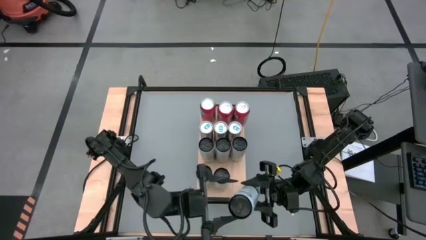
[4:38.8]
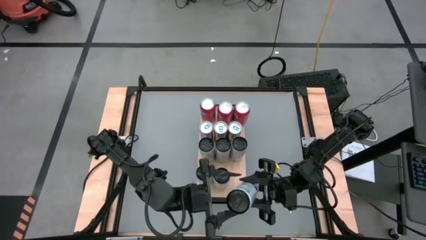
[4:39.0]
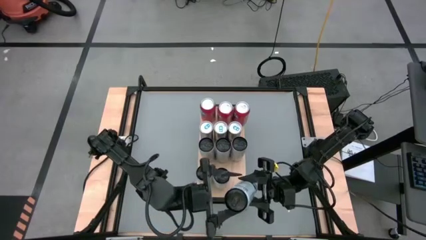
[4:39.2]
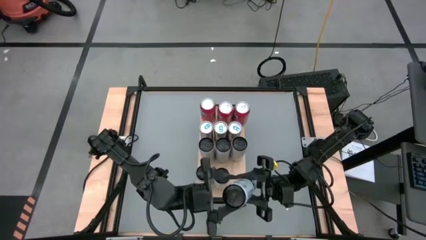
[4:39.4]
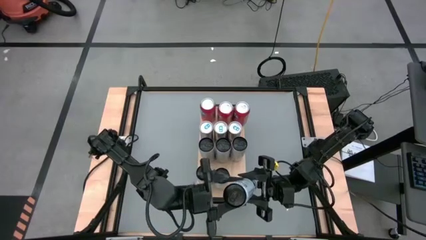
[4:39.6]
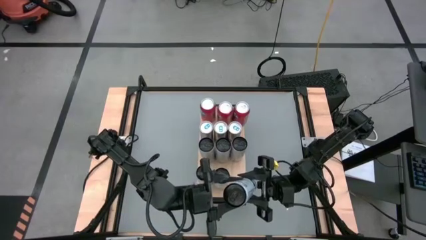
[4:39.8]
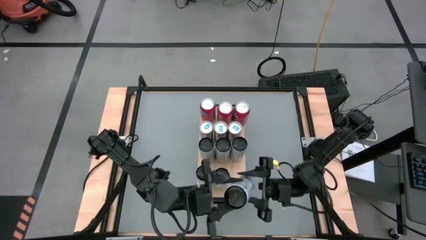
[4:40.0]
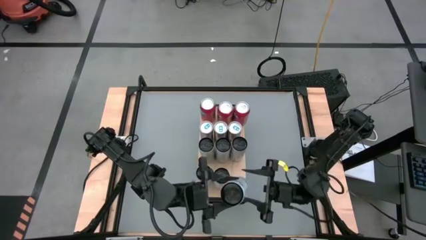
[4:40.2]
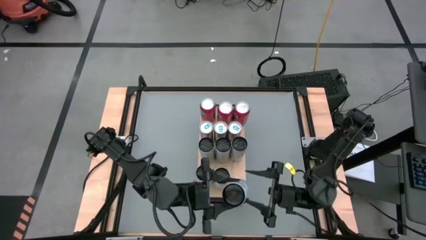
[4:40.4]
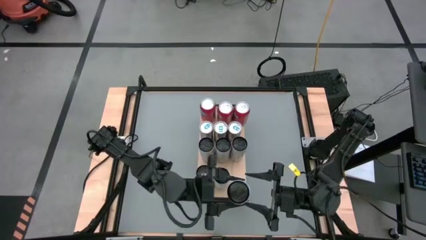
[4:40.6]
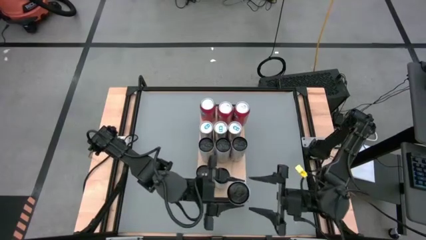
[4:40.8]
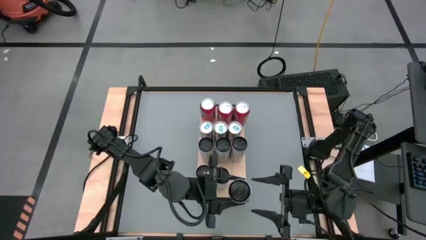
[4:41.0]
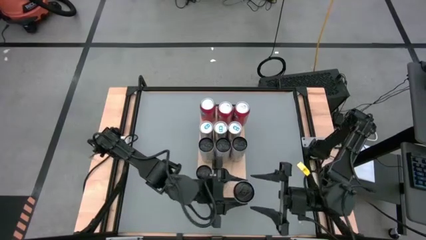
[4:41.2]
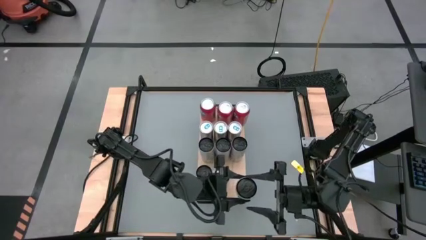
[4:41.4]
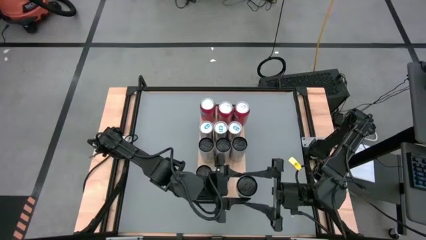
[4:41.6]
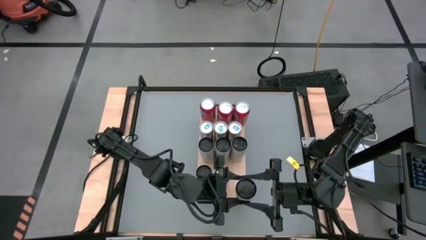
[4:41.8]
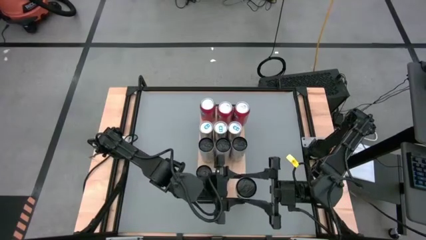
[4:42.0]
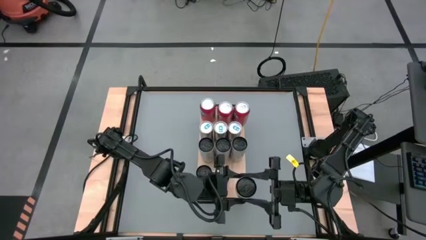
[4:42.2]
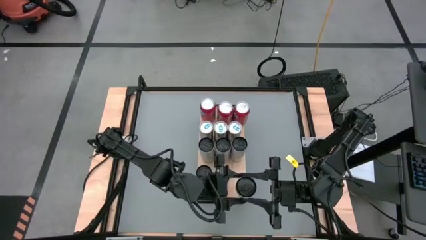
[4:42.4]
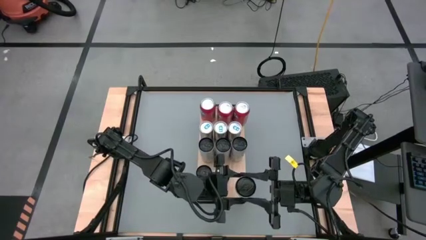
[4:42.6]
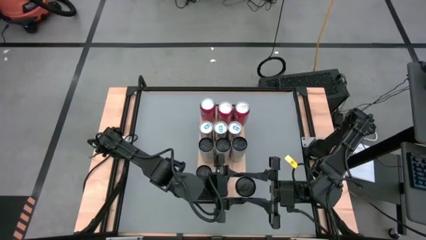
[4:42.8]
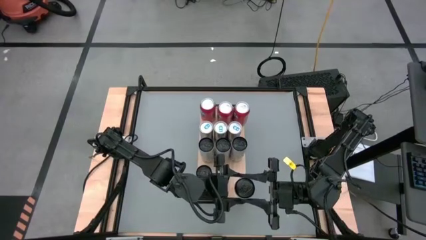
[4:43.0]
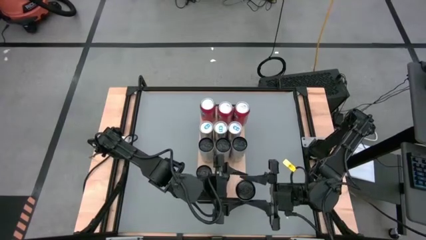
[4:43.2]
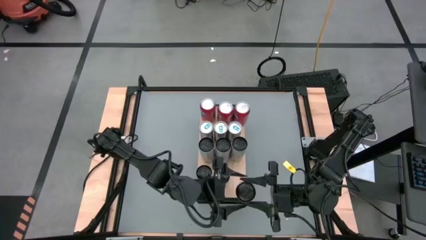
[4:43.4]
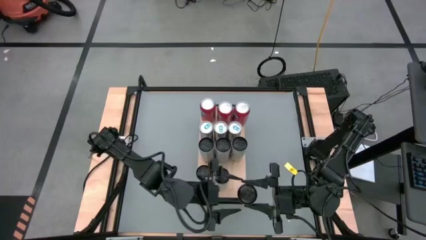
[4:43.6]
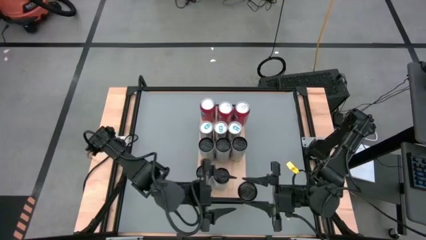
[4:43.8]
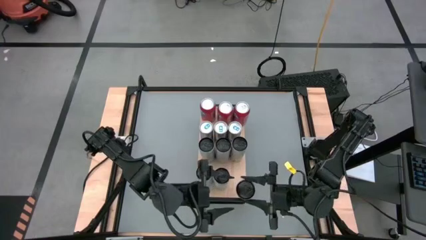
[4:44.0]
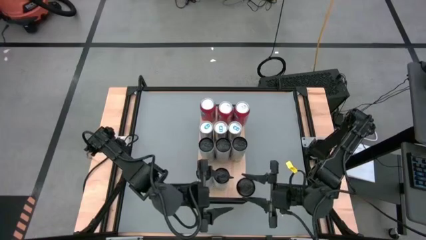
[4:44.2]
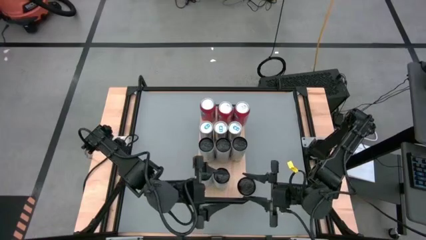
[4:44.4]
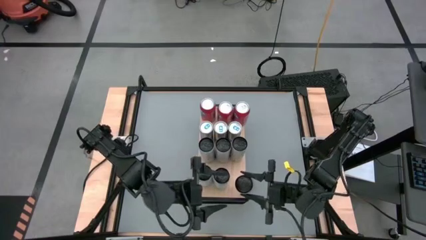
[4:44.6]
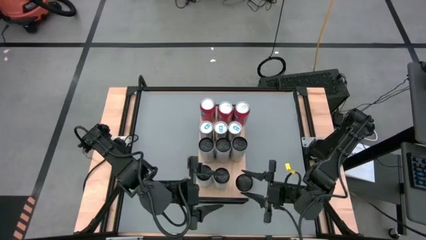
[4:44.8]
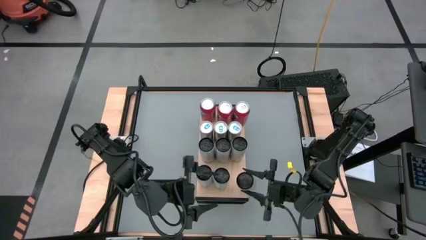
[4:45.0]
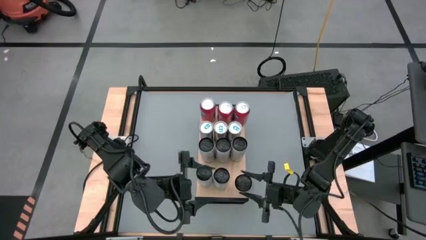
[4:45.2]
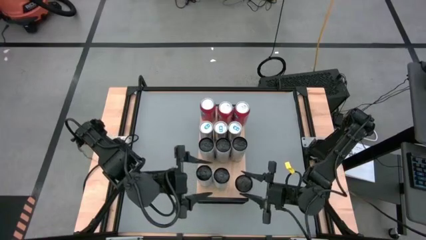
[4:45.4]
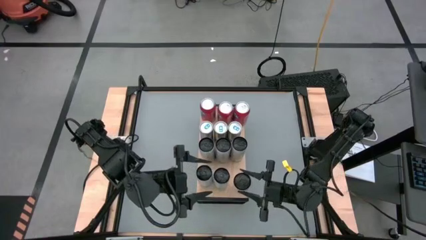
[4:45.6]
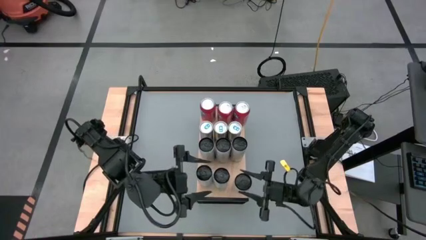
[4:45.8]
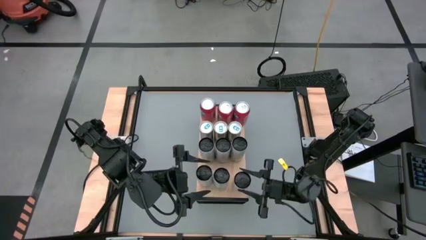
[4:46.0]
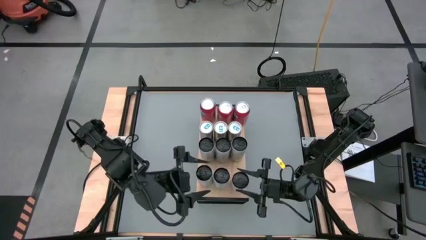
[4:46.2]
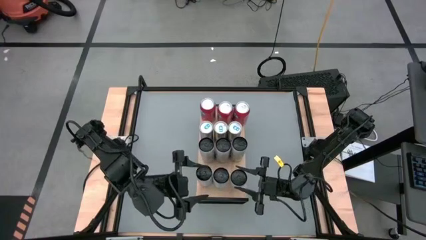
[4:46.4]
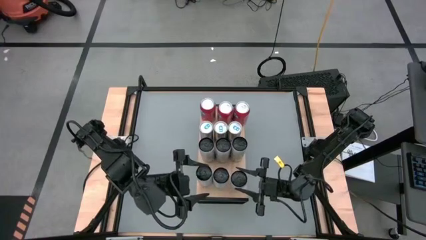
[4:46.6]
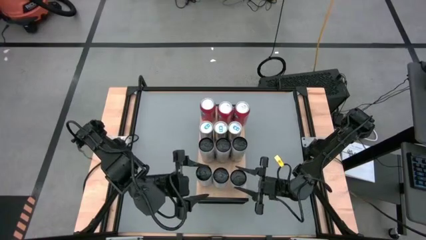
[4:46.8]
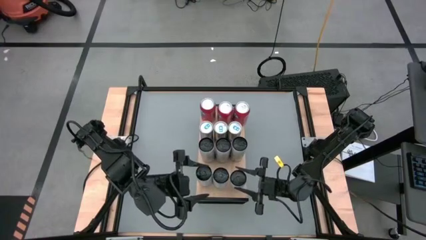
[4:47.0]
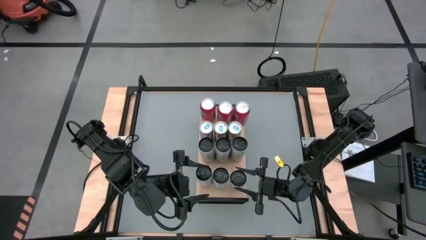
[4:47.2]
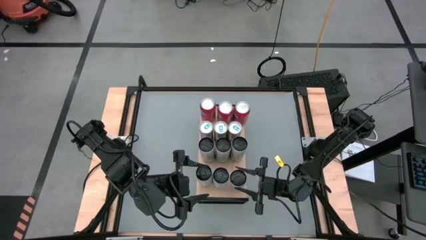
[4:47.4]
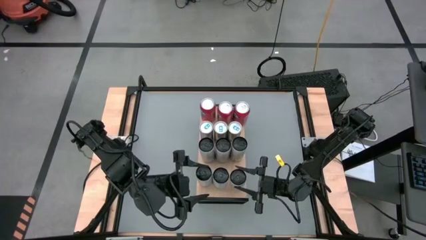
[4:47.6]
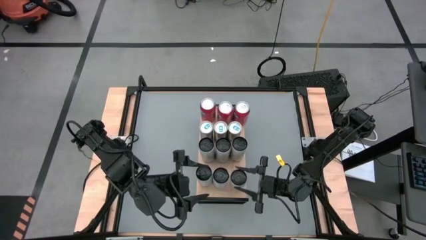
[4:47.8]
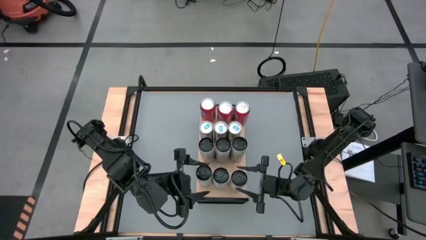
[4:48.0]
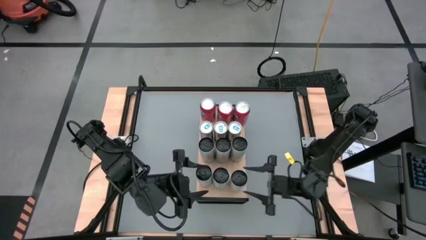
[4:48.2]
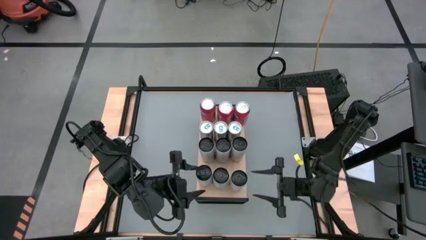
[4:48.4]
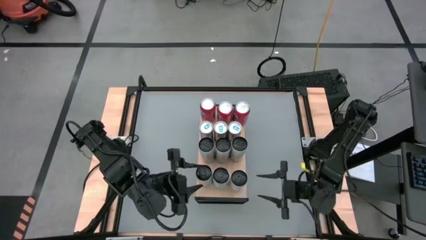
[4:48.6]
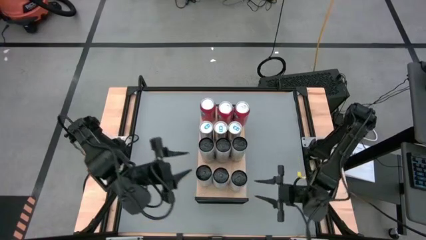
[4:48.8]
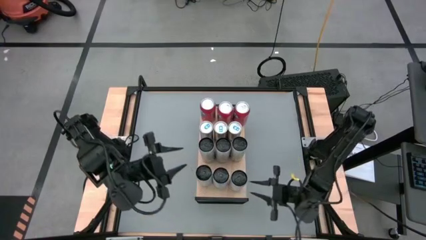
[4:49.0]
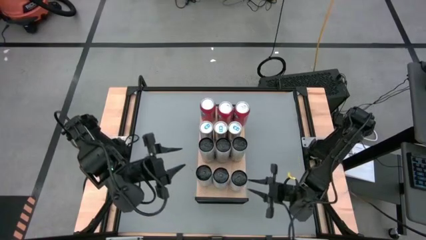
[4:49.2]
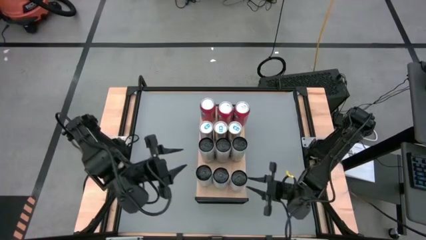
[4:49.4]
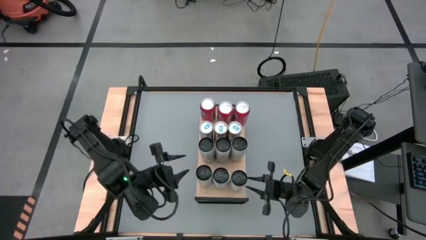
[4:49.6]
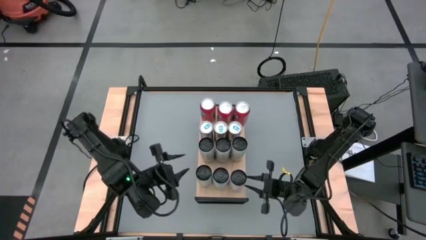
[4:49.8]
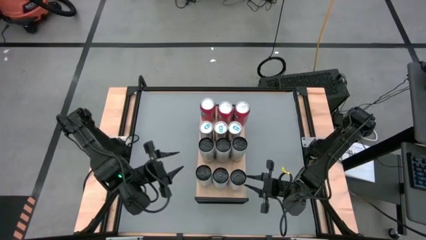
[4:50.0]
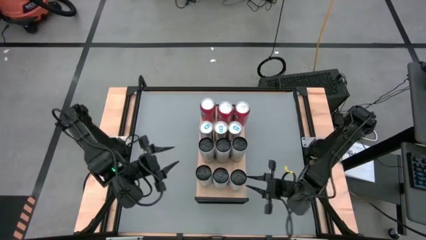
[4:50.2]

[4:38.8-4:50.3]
Task: Place canned beverage on shelf
Put the white soda can on the shelf aligned with the other white soda can
